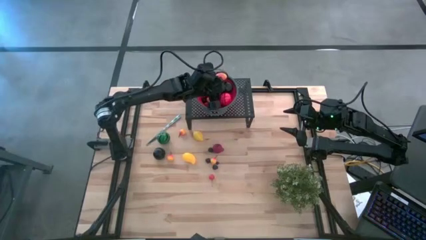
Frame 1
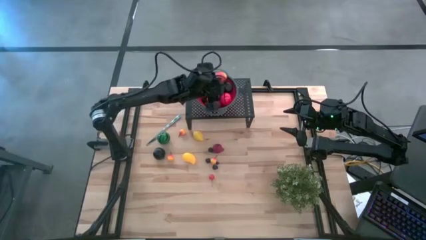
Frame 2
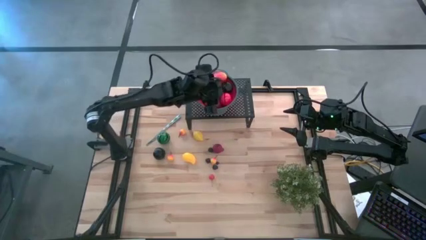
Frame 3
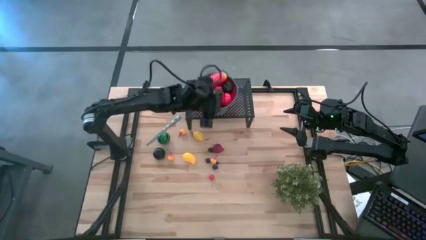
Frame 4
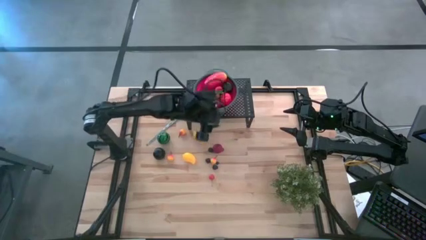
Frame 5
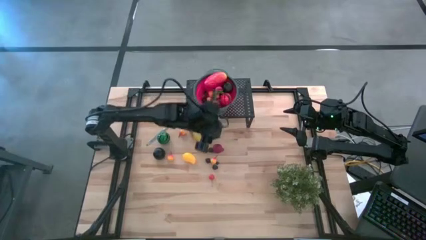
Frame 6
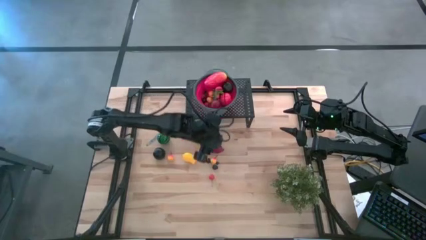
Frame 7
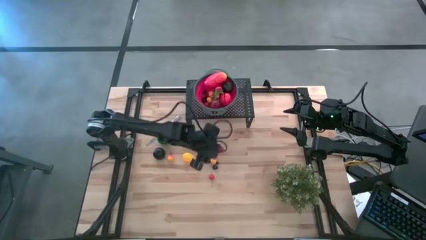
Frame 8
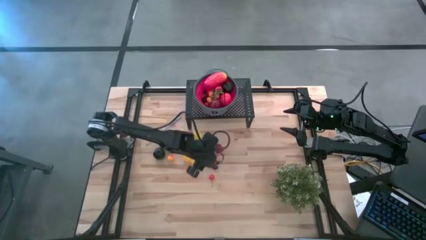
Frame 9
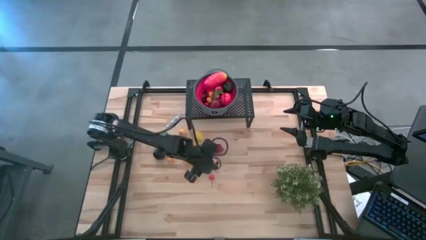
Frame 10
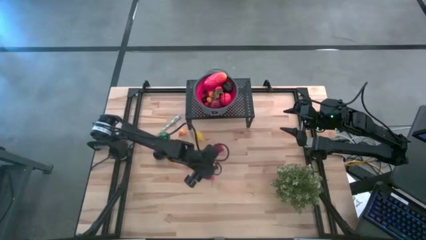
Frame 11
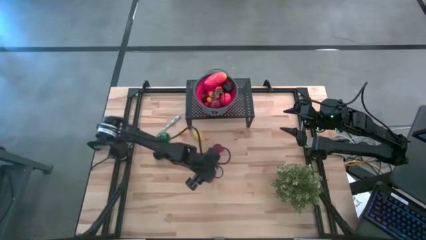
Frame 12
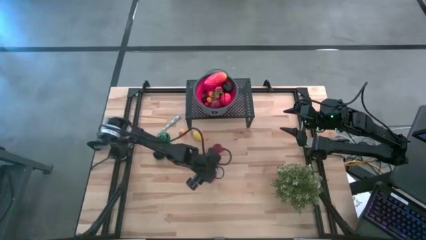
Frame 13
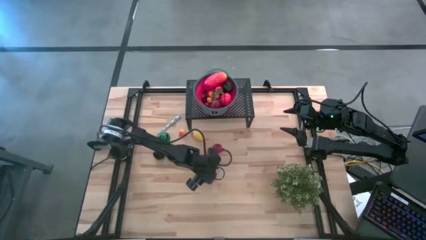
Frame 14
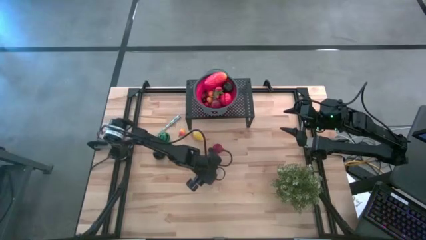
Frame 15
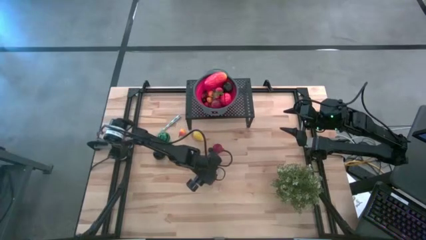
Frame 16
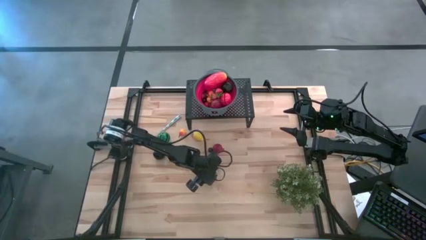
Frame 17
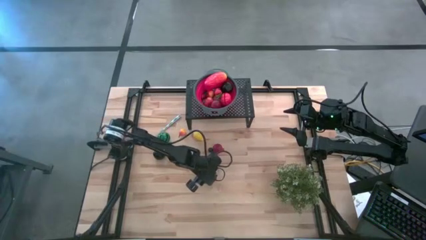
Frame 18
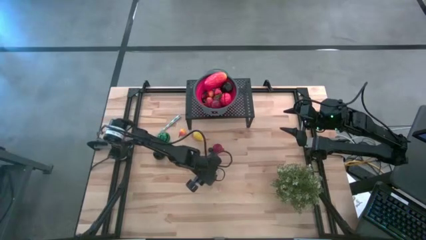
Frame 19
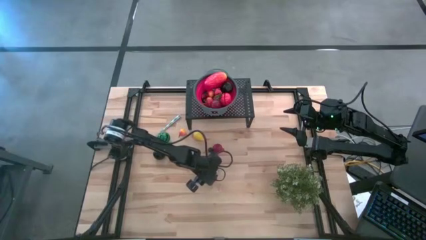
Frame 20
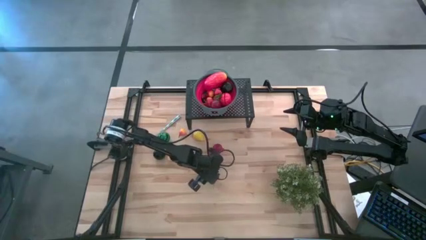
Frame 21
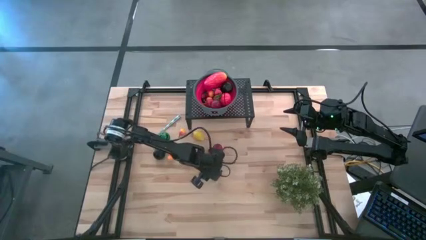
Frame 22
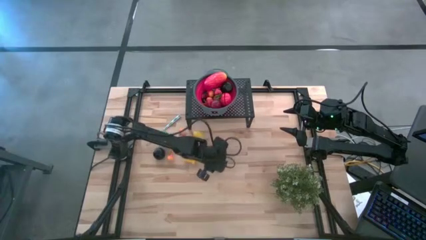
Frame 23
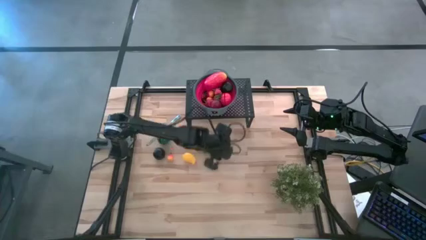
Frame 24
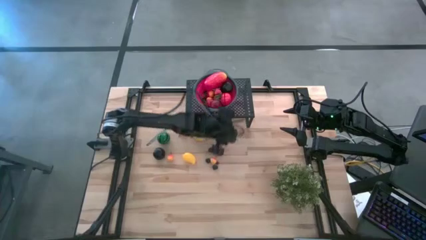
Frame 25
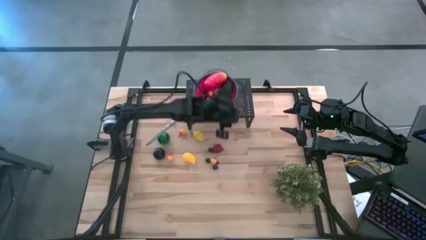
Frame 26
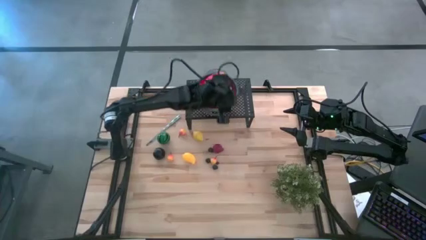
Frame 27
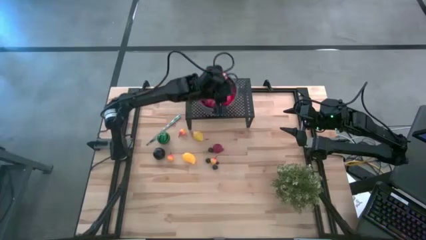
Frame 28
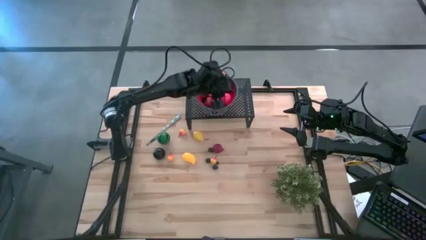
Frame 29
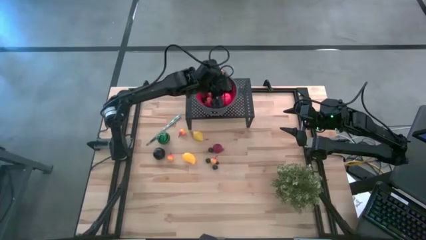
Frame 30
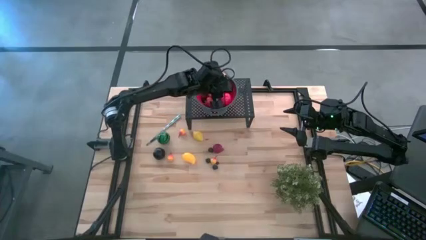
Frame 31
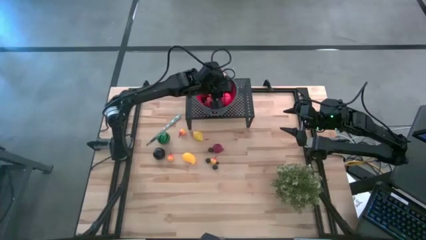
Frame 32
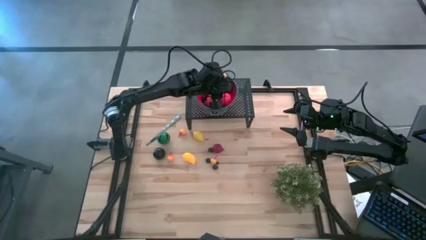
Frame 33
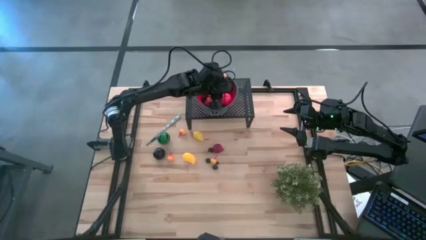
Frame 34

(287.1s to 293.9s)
Task: Pick & Place Fruit
Put the red cherry in the red colander on the shelf

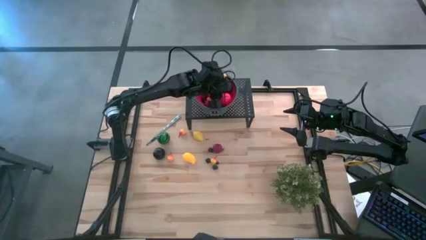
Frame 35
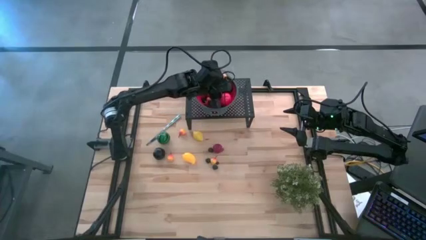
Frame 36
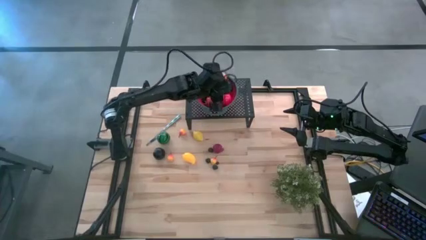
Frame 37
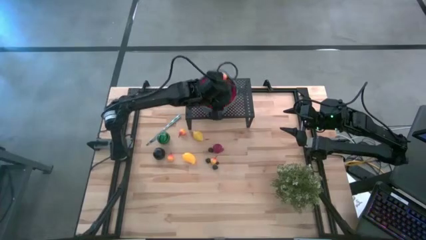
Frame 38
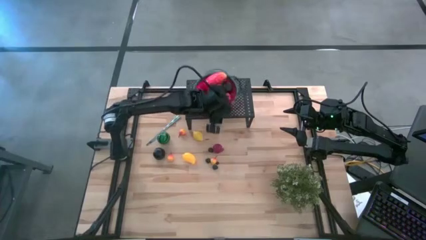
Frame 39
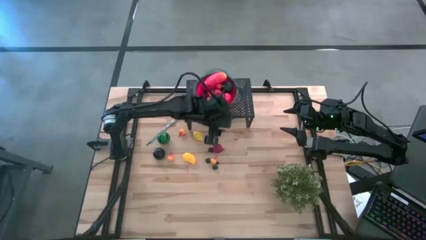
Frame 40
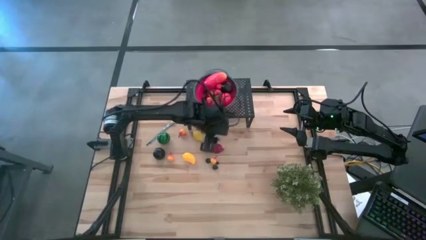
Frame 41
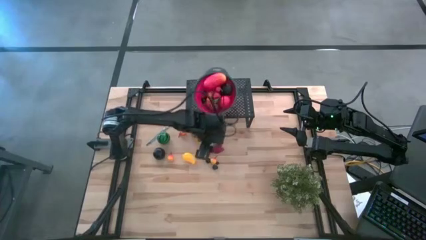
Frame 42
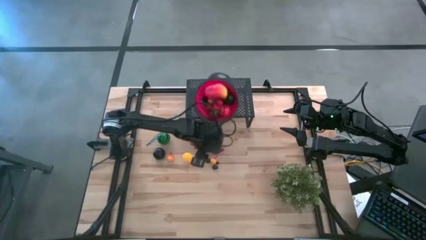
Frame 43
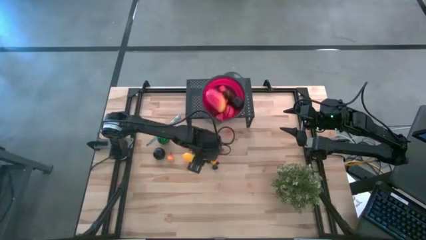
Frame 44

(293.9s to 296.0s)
Put the black cherry in the red colander on the shelf

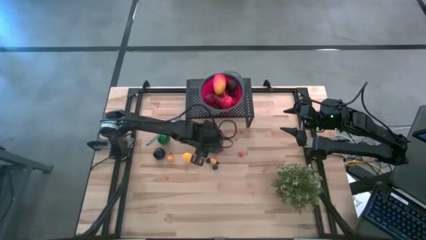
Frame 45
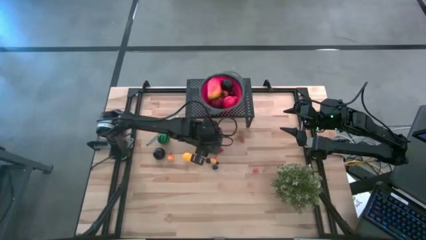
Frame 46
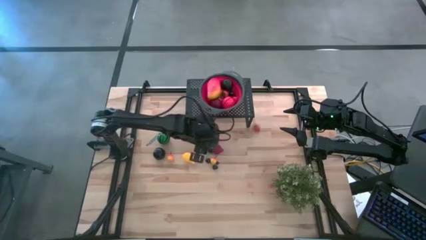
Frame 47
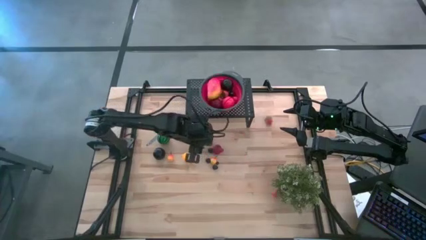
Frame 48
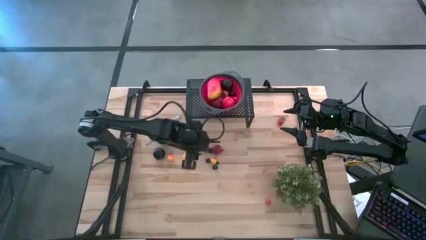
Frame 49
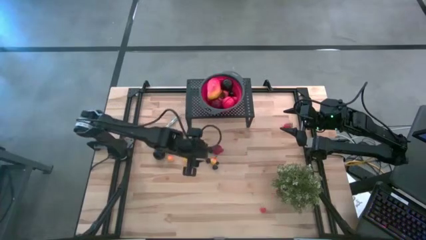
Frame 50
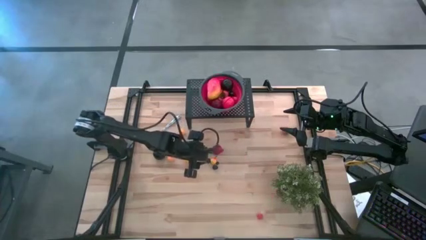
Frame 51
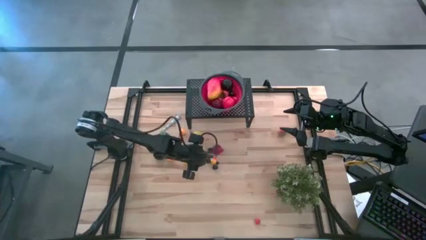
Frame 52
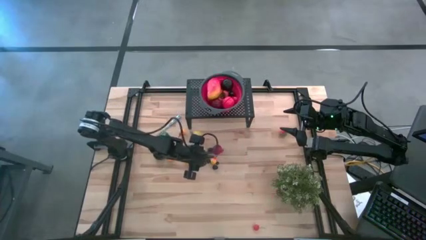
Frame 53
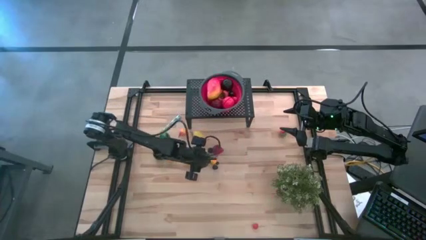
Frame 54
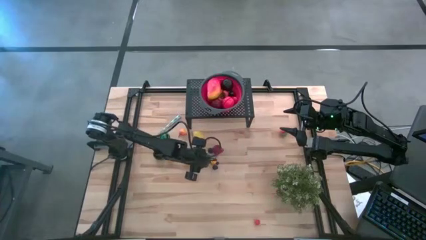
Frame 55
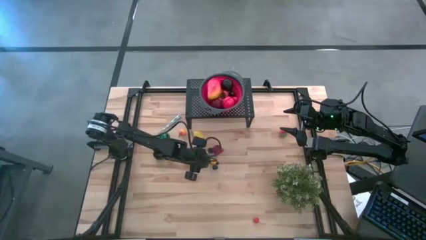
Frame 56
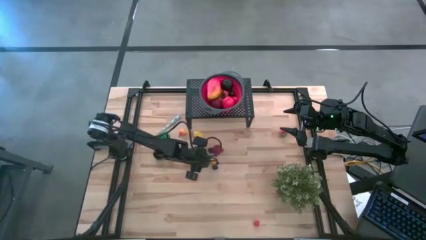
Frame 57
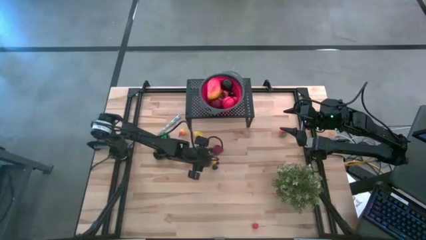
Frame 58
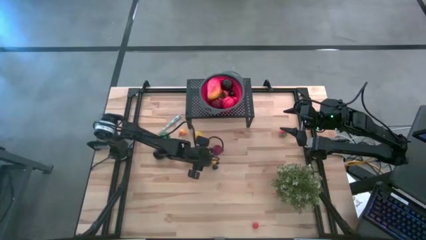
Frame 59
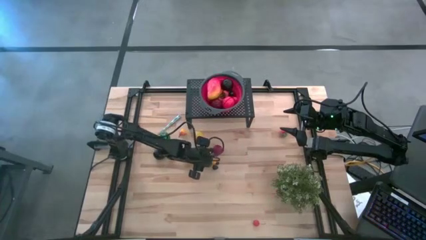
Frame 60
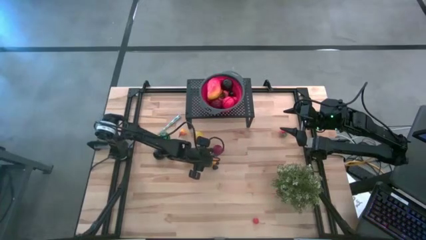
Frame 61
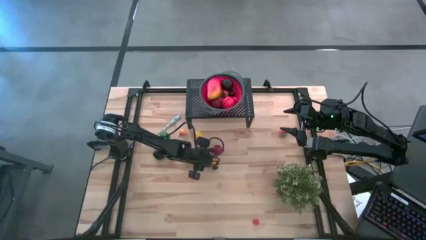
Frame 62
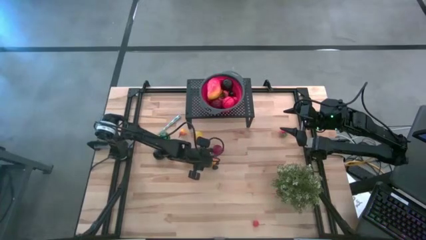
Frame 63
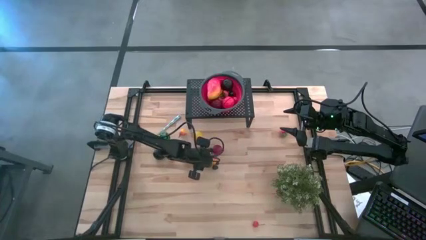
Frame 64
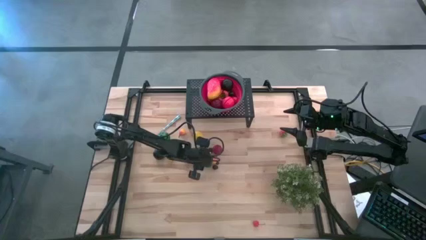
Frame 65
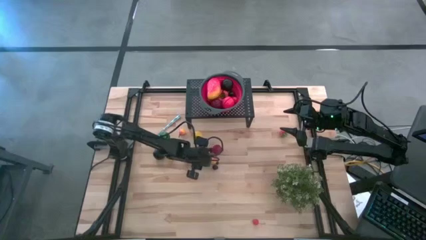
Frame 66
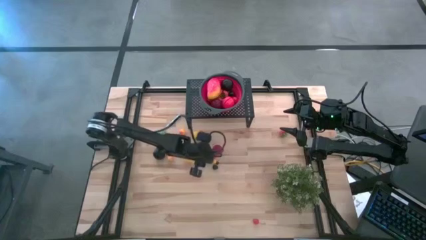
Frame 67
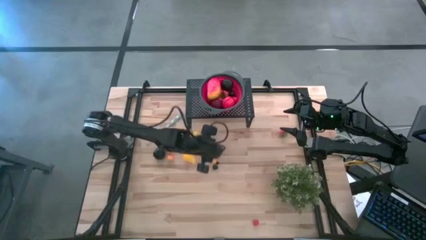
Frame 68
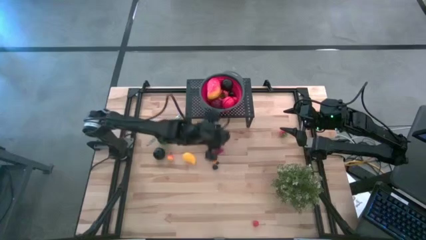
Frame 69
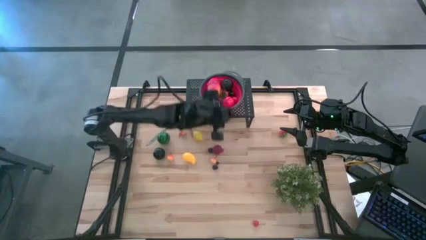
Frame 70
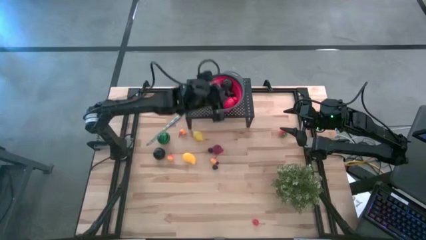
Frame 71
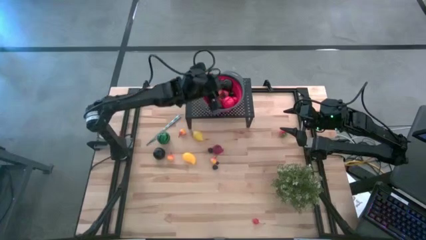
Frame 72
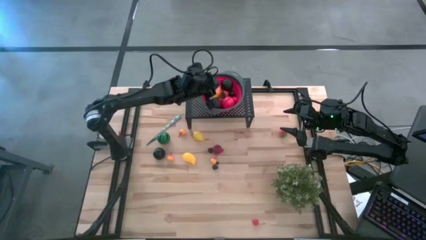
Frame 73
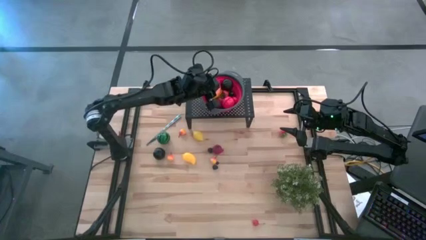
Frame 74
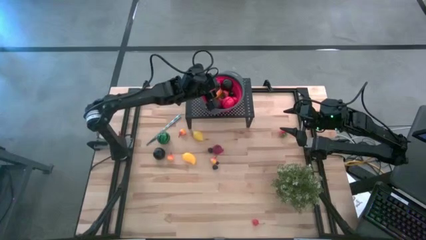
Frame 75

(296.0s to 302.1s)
Put the black cherry in the red colander on the black shelf

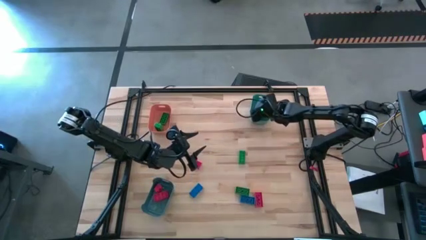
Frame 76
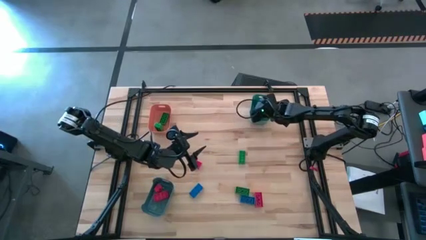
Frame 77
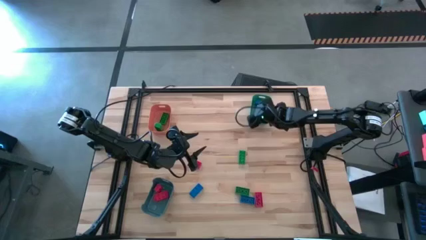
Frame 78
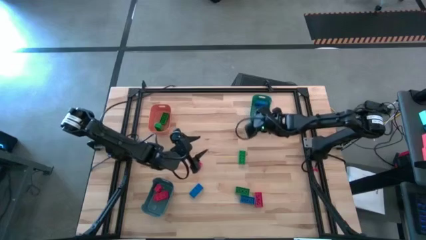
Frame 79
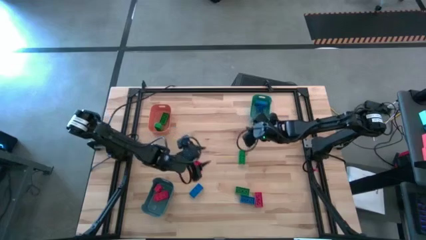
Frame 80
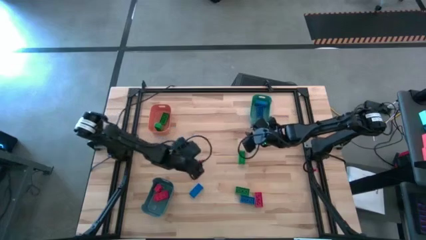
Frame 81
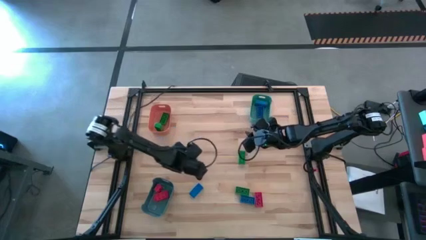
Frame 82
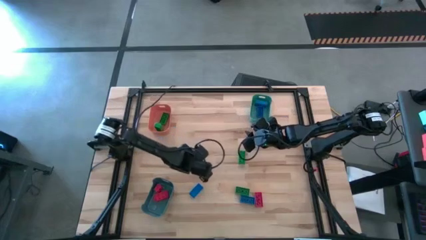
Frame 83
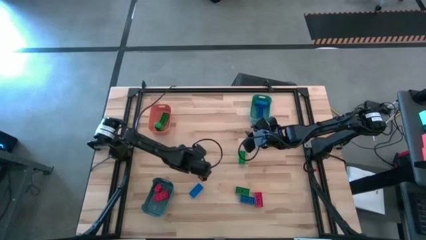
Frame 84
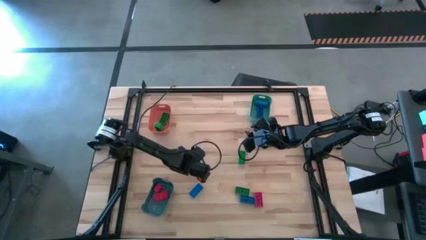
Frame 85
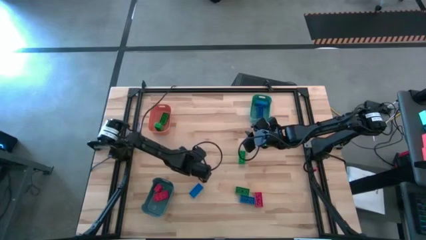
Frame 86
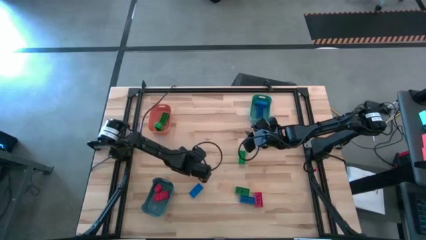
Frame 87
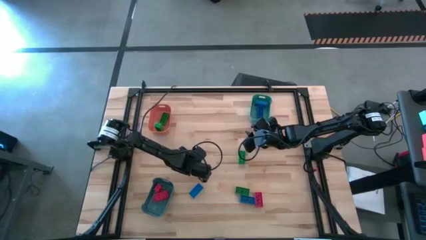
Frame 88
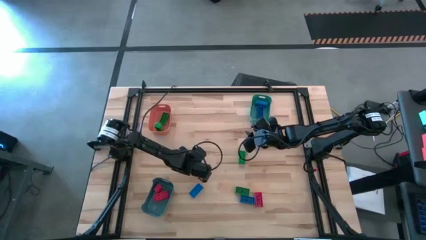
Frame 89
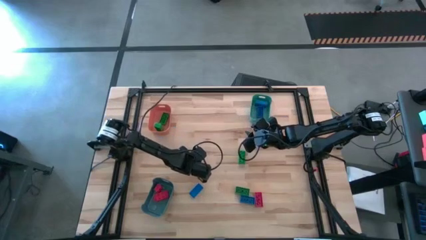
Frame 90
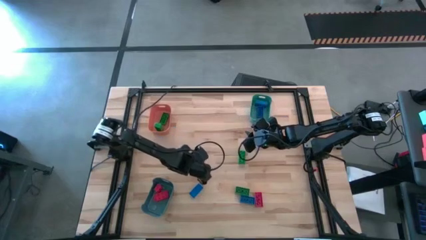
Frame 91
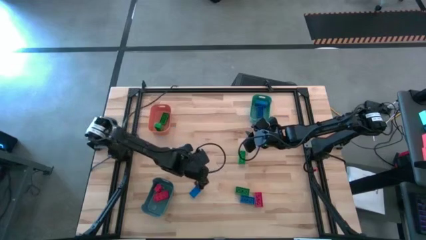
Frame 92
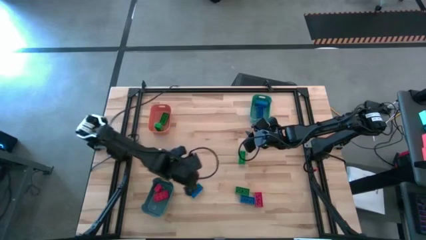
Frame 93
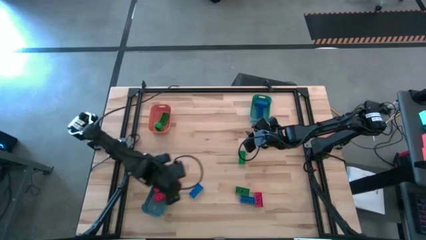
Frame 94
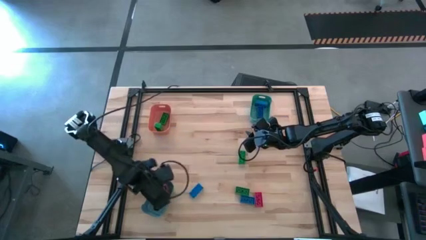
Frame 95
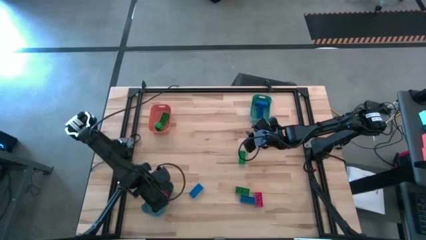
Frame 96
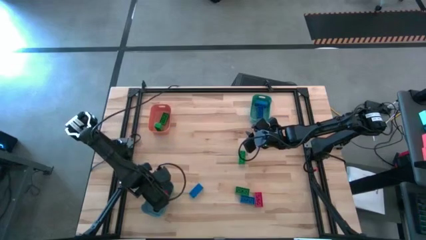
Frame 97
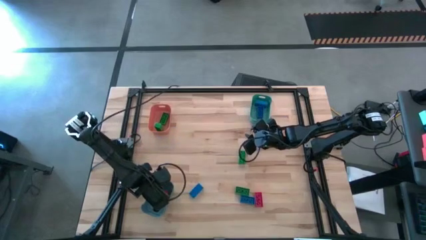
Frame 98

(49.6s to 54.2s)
Task: Sort & place blocks by color
Put the red game piece into the blue bin
